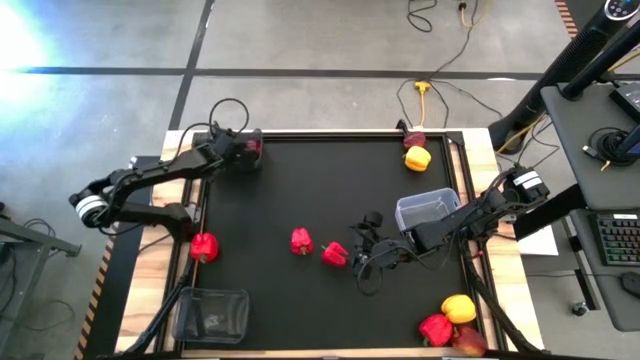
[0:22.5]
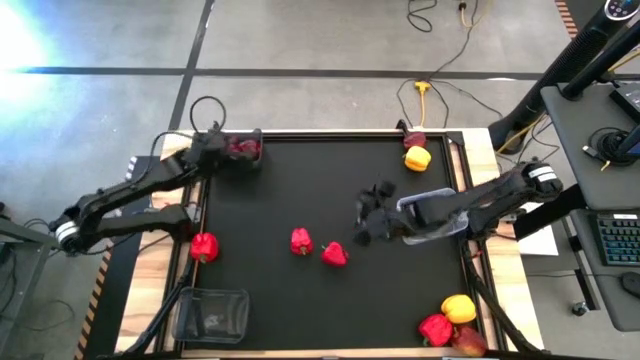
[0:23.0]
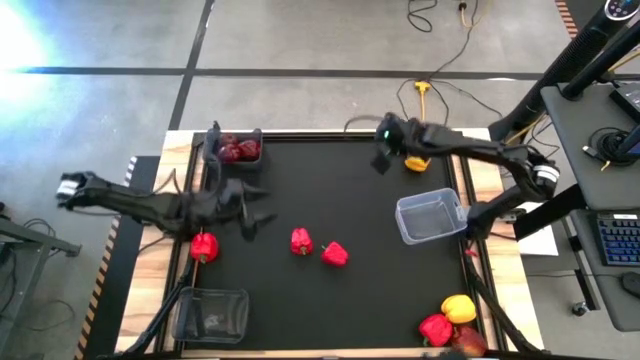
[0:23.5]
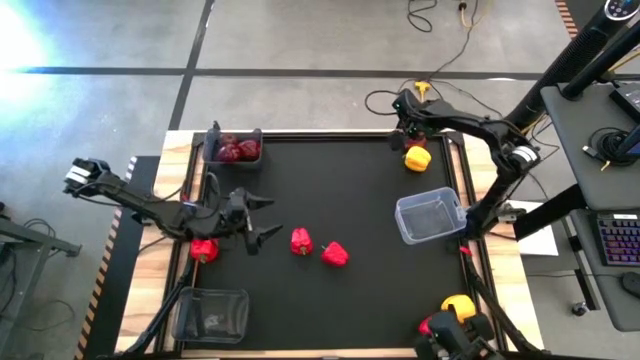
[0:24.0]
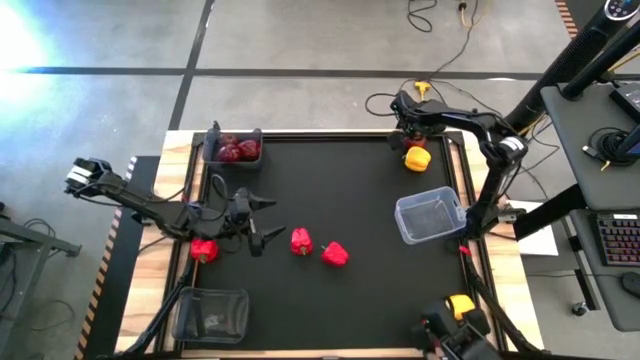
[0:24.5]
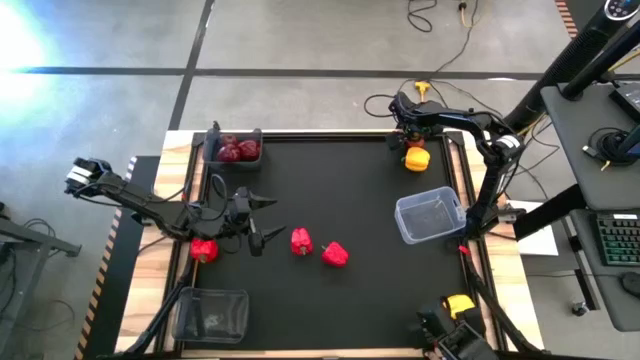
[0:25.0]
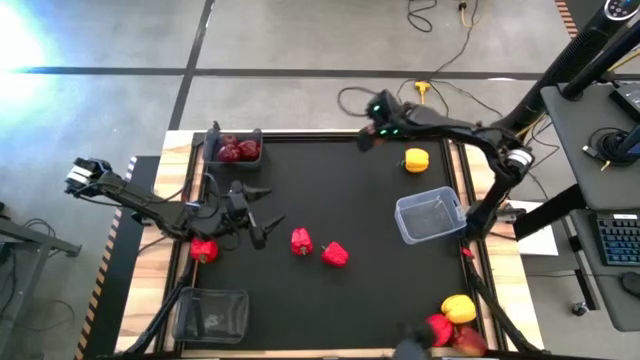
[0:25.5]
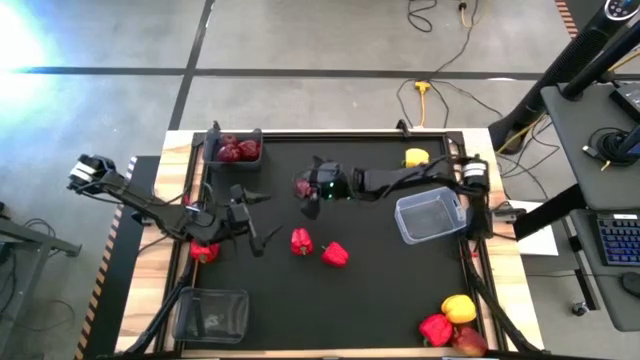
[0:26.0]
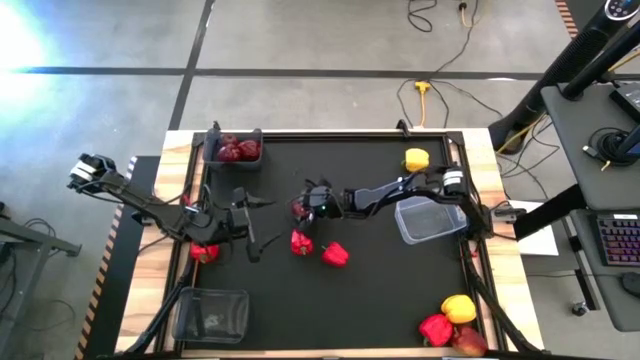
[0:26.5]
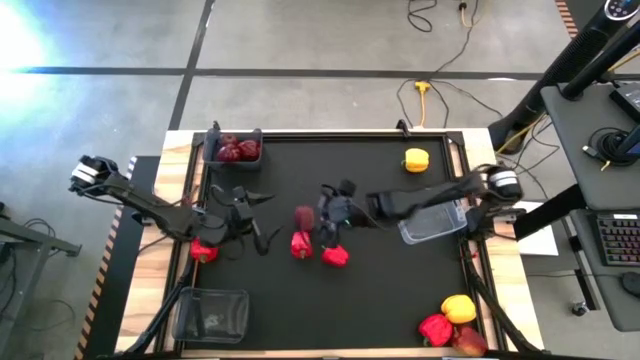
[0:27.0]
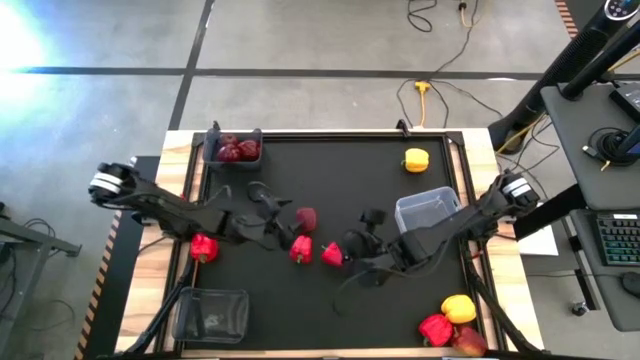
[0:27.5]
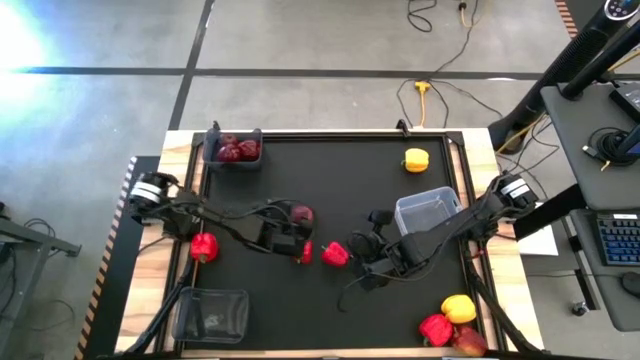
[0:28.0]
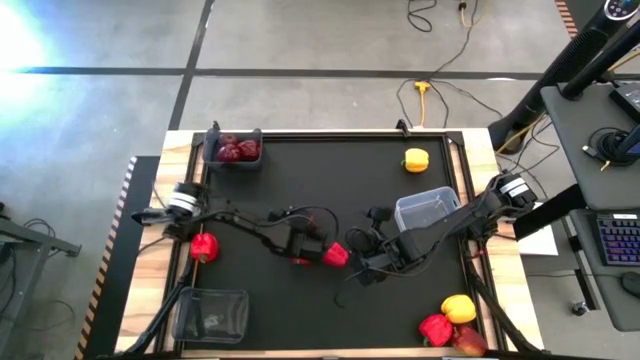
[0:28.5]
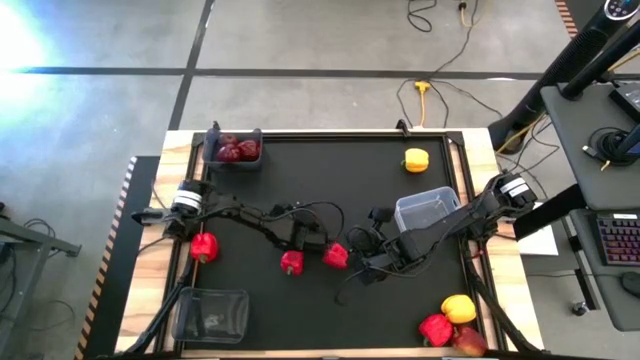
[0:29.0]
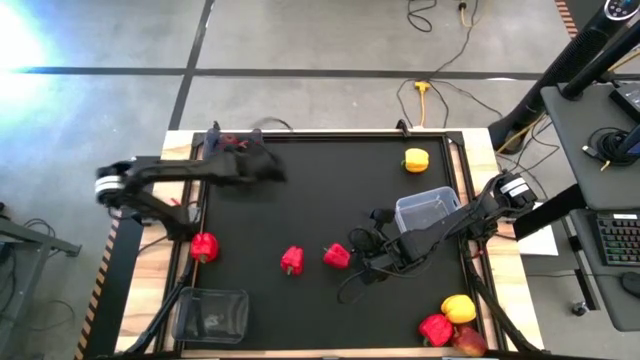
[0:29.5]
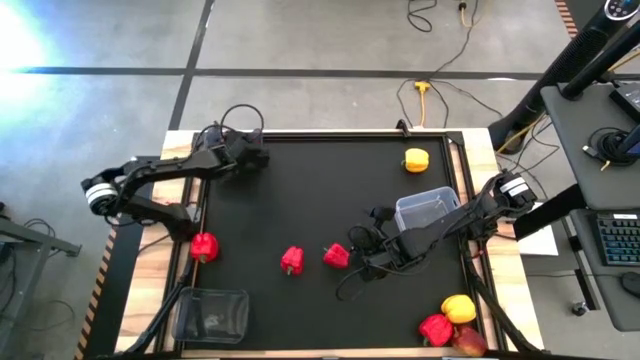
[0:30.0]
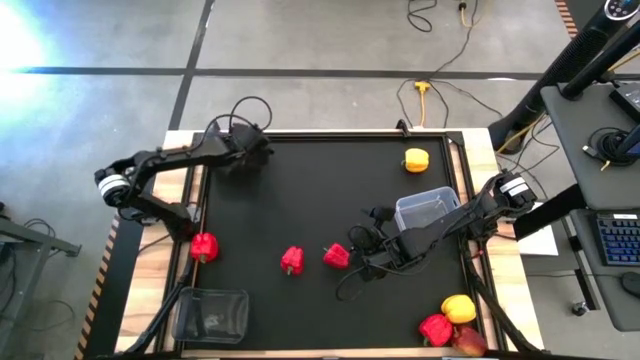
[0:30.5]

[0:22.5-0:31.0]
Task: Sort produce into baskets
Put the red apple into the top black bin

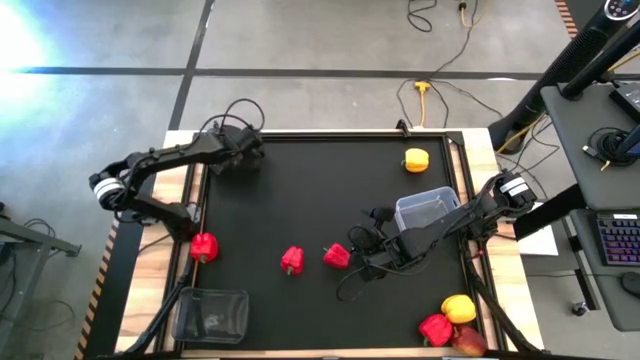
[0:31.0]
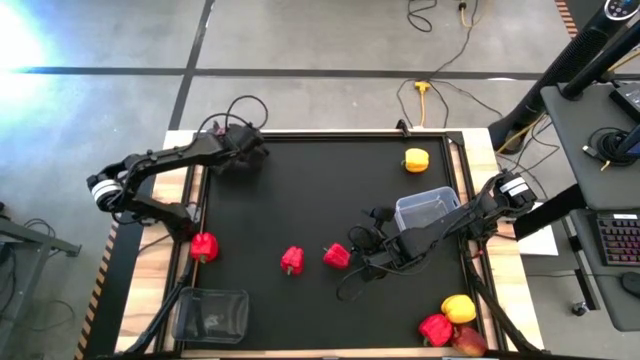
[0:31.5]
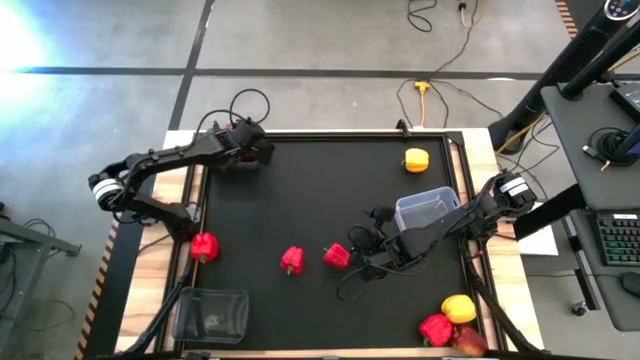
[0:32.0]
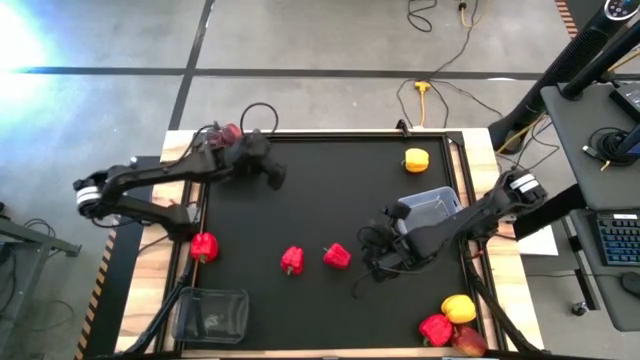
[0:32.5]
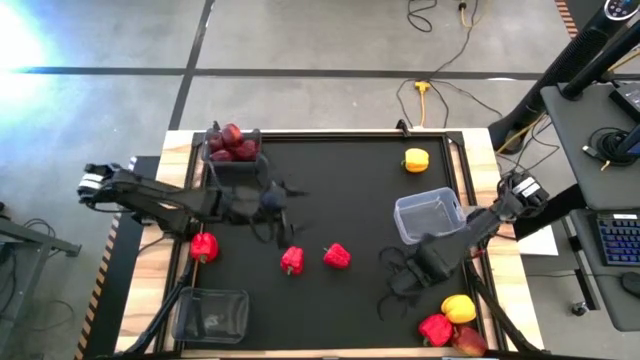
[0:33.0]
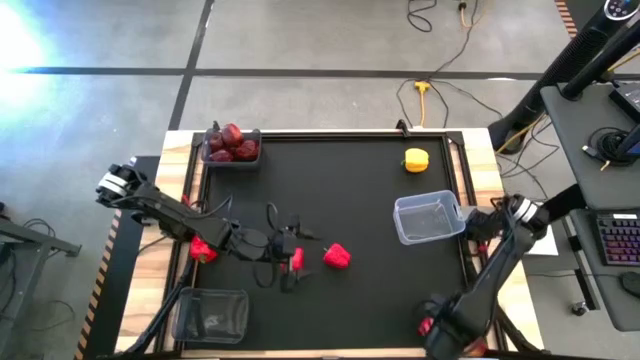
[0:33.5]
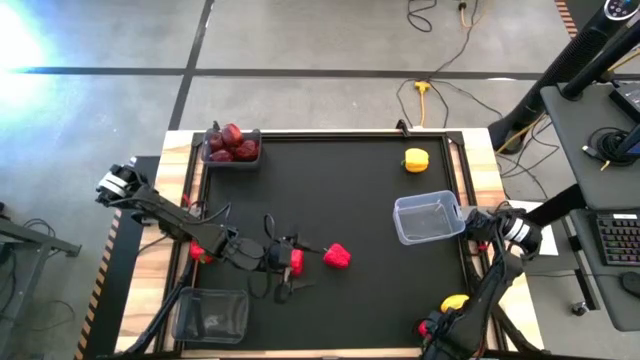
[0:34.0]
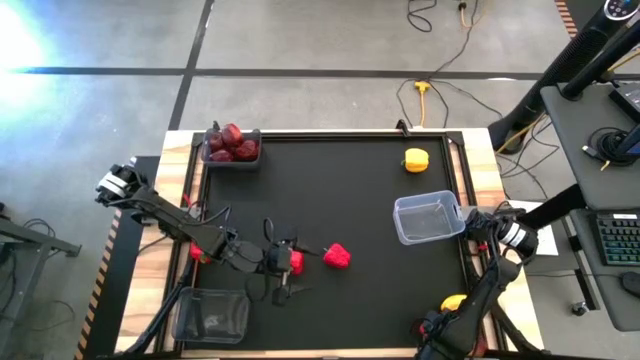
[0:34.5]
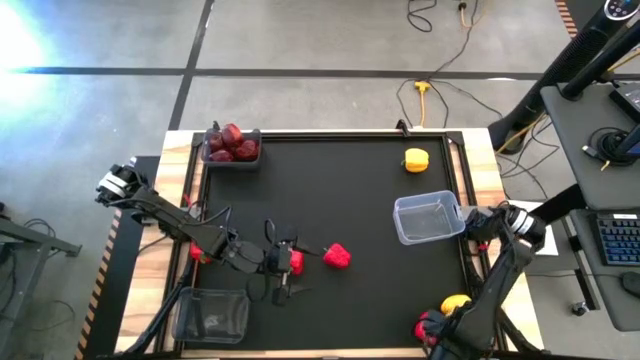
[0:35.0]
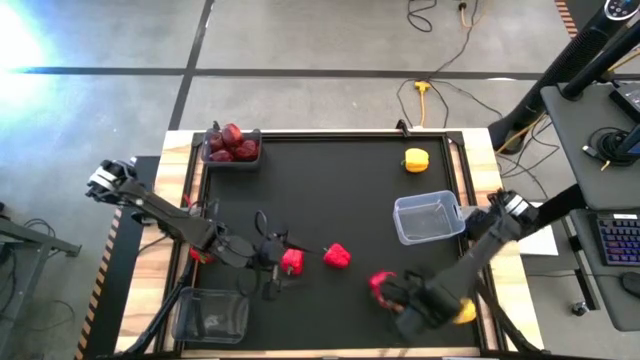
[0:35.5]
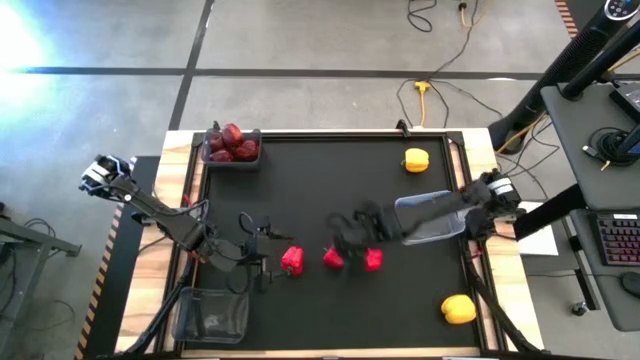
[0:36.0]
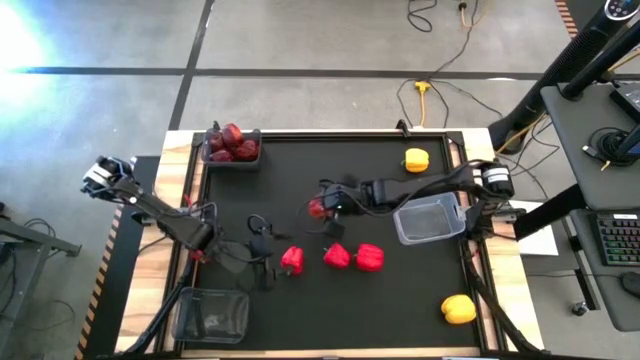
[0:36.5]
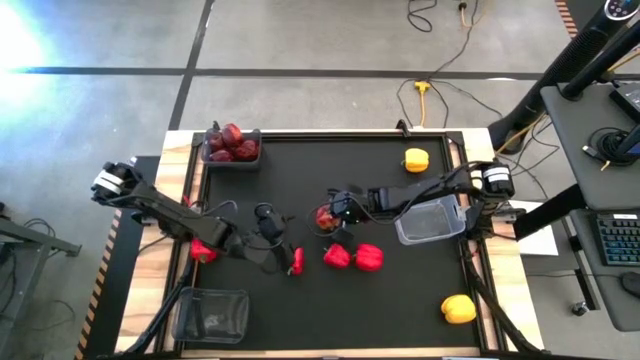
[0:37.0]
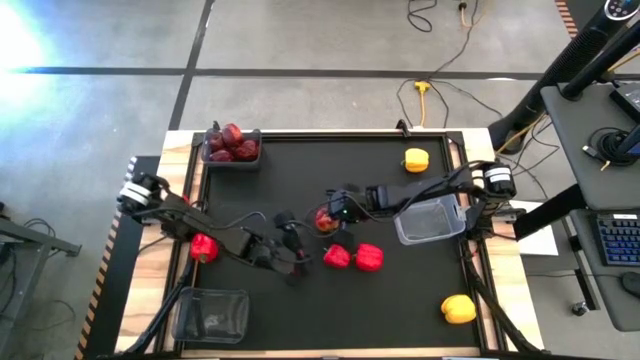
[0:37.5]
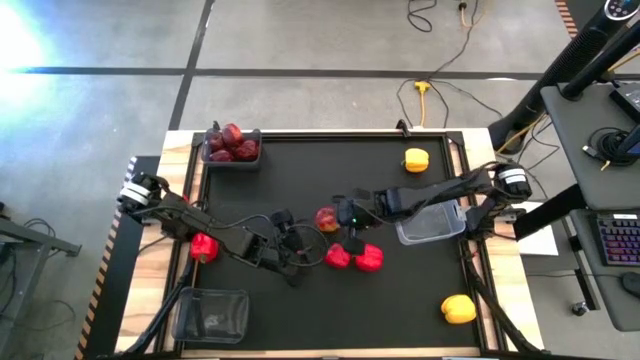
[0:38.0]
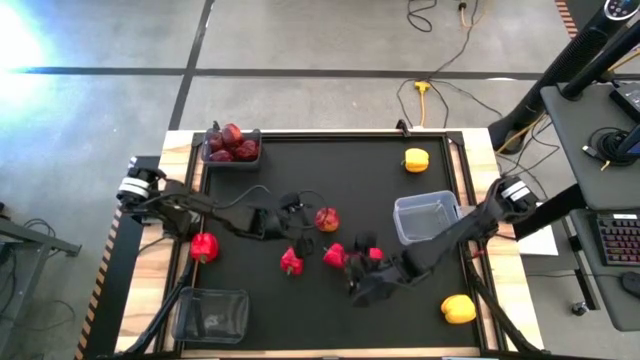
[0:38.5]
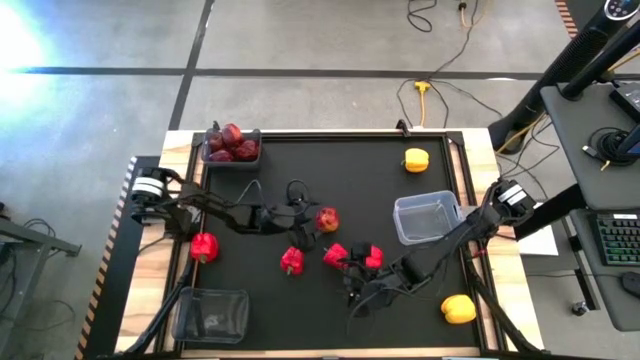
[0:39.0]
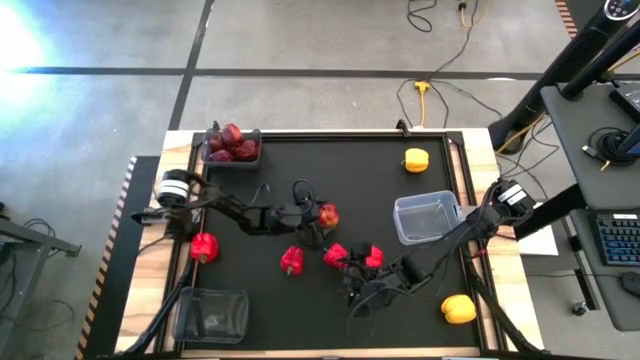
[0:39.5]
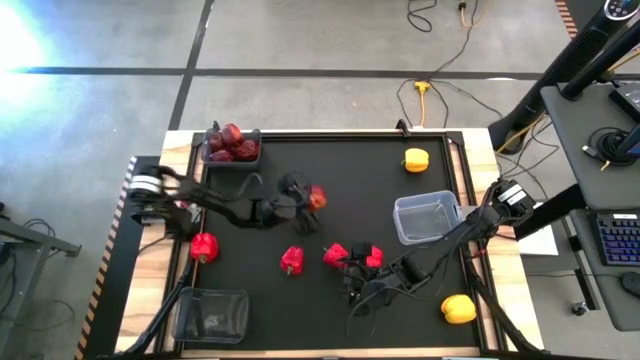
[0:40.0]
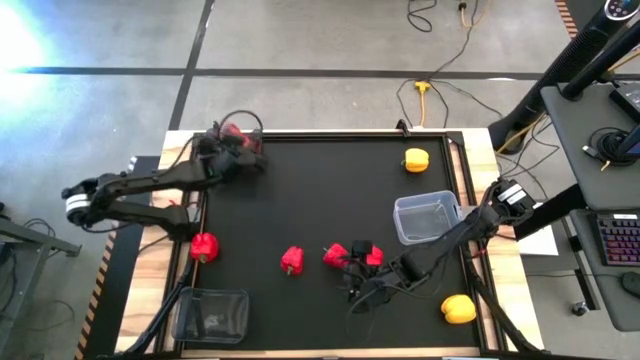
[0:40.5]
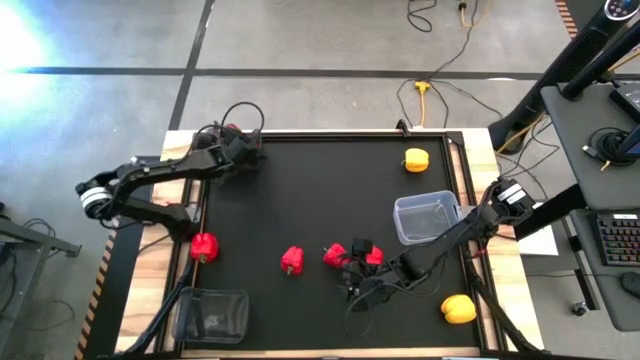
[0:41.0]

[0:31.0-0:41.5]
Put the red apple into the top black bin

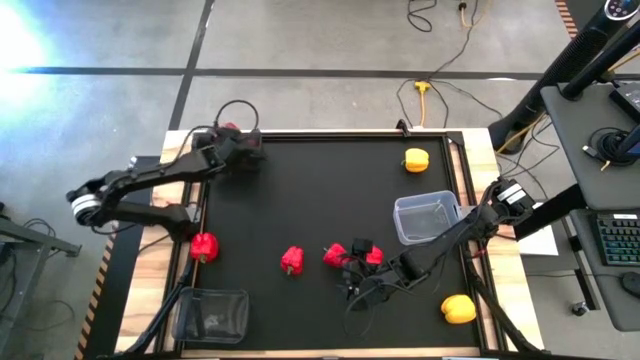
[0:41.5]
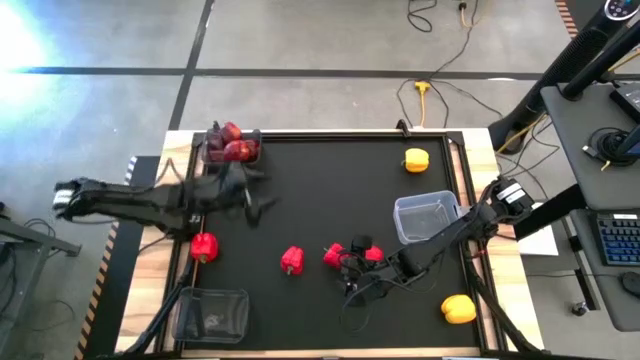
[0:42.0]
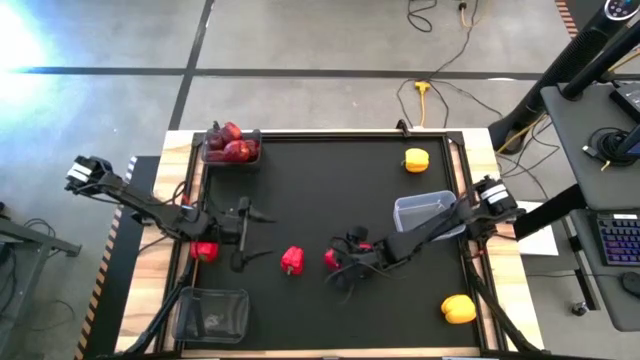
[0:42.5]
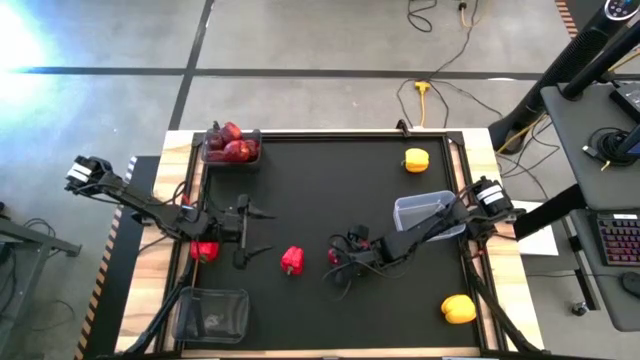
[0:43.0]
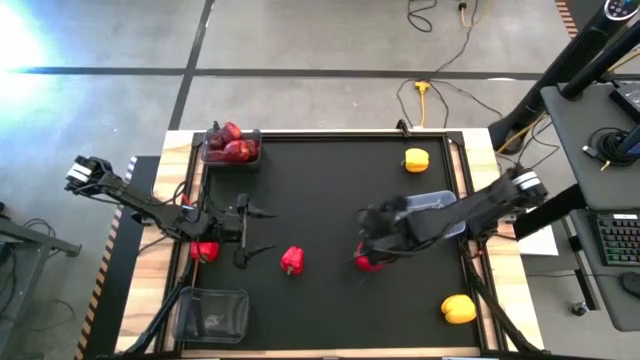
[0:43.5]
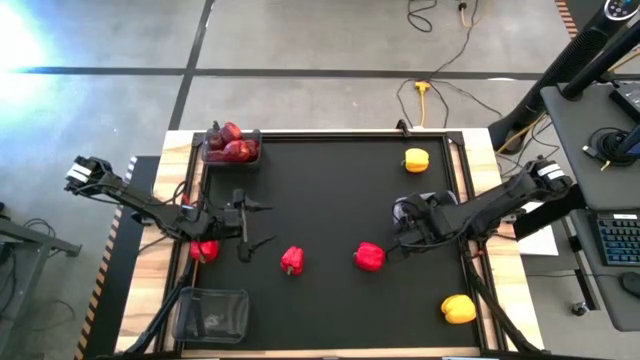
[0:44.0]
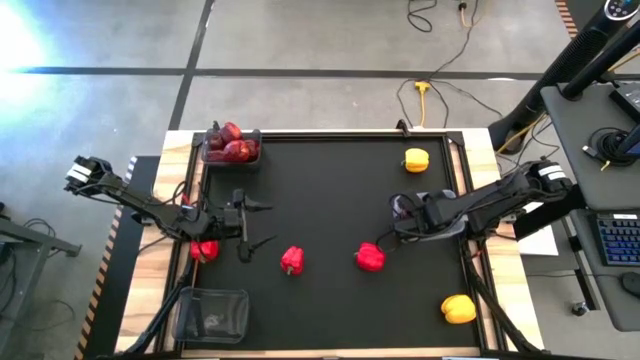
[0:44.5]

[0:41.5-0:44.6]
Put the red bell pepper into the transparent bin
